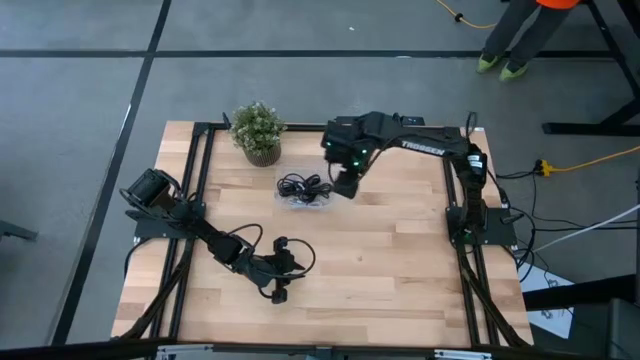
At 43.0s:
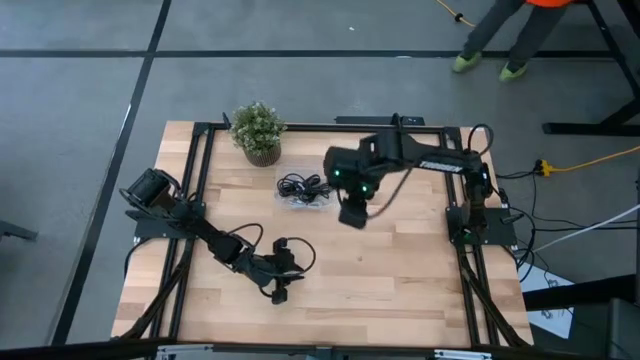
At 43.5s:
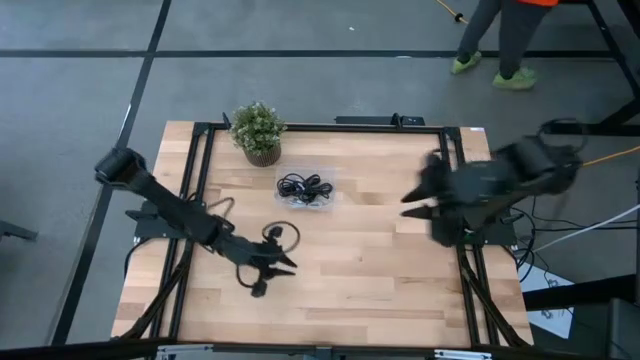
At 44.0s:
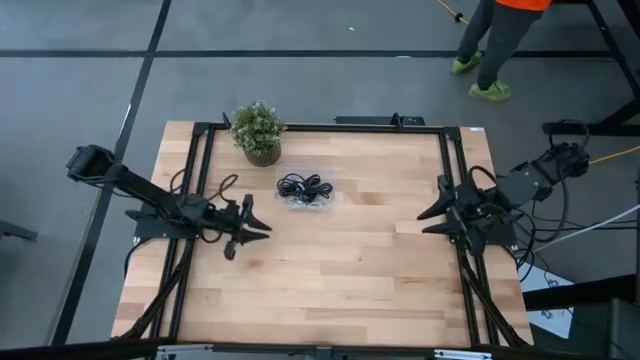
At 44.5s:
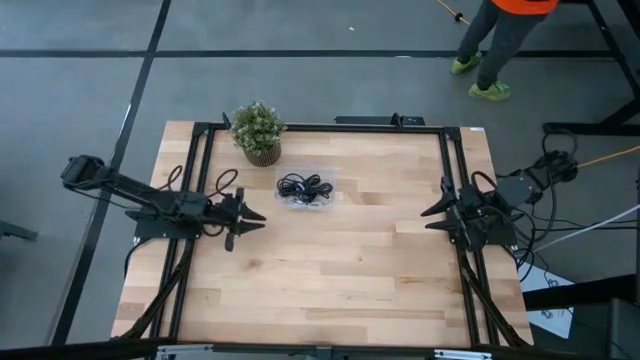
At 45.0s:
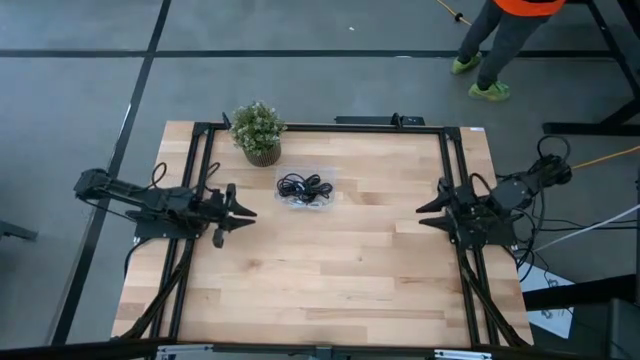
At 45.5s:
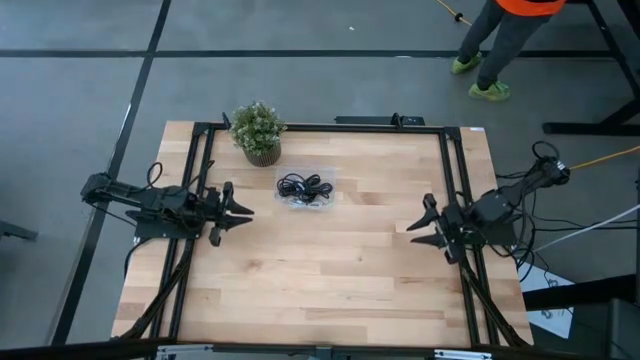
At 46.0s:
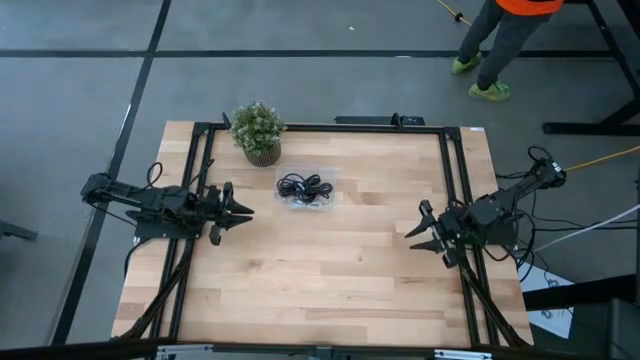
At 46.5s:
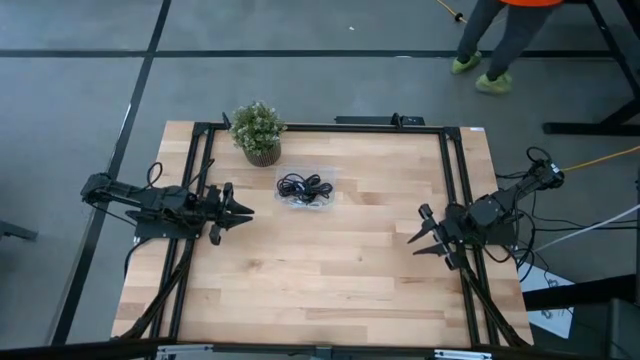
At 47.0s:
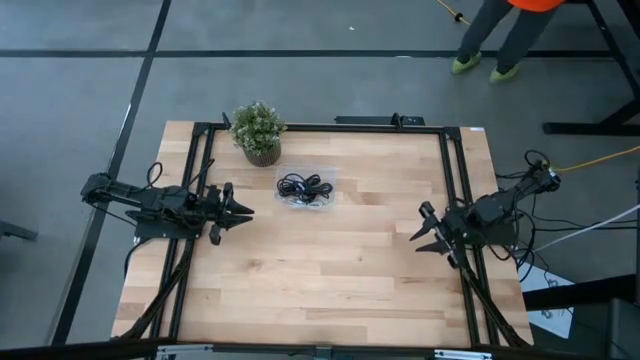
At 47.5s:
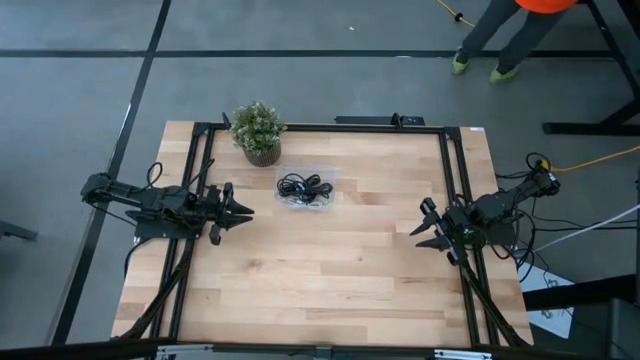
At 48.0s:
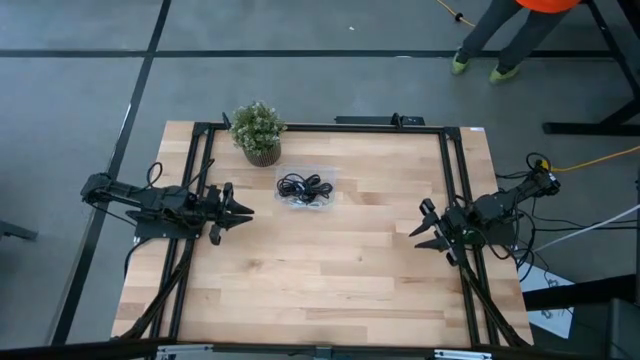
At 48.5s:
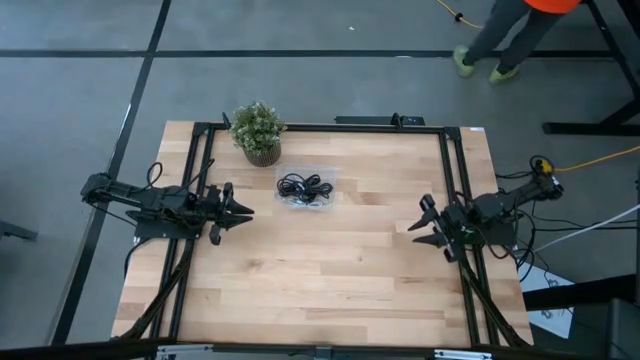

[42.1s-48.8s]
Task: Pick and place USB-C Cables
Return to home position

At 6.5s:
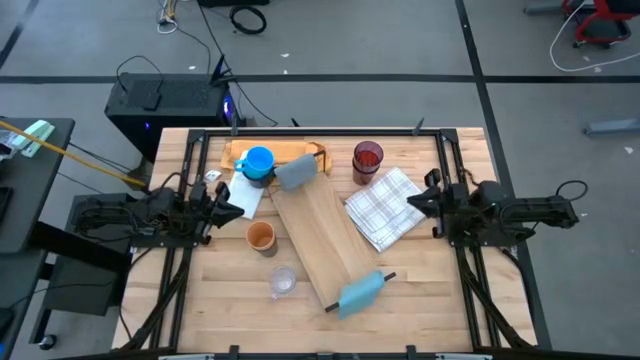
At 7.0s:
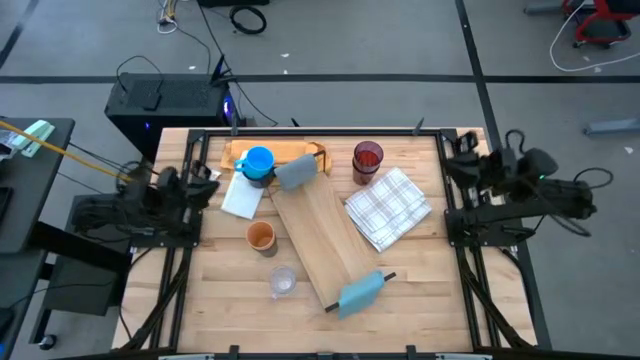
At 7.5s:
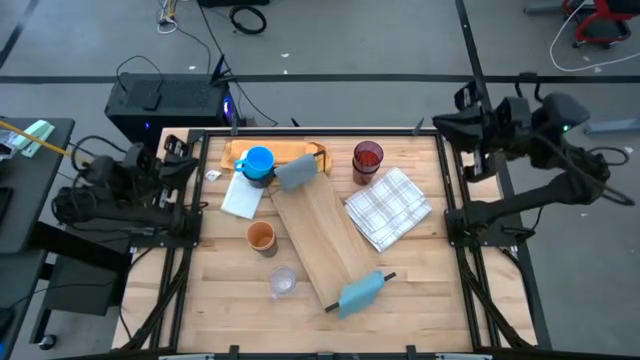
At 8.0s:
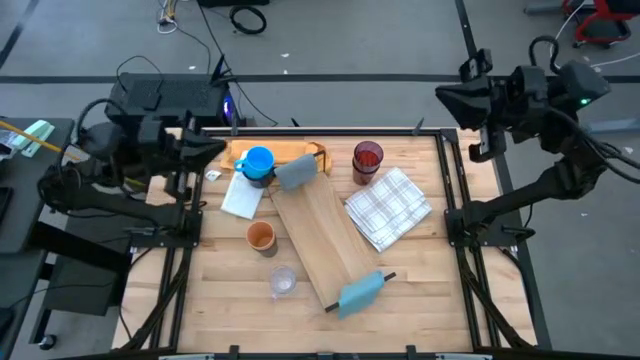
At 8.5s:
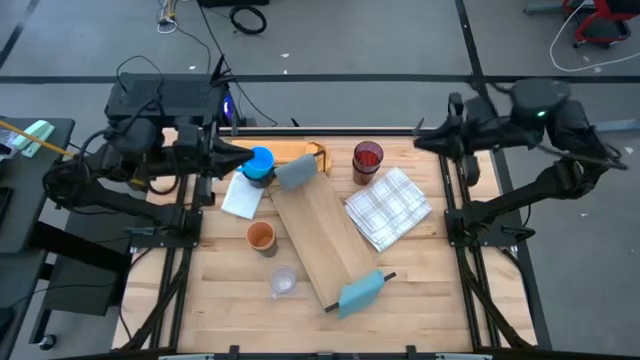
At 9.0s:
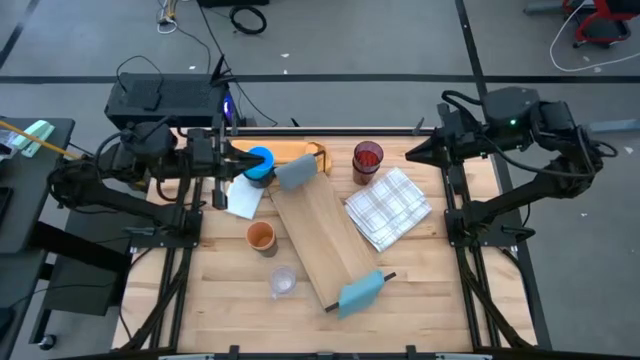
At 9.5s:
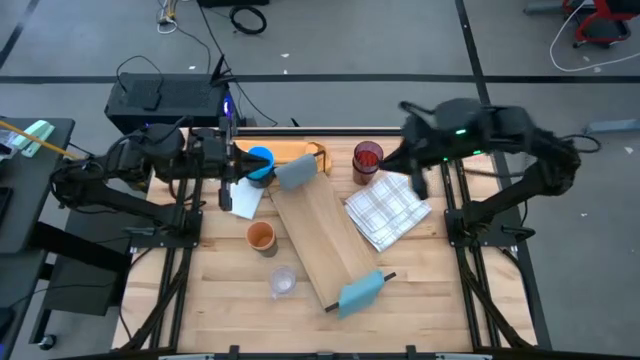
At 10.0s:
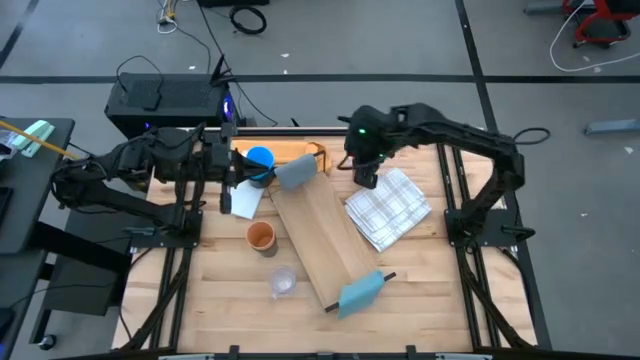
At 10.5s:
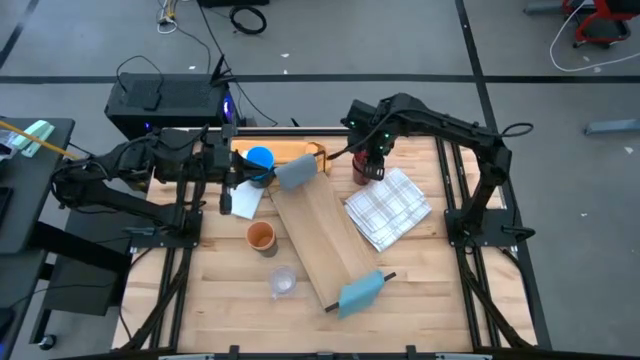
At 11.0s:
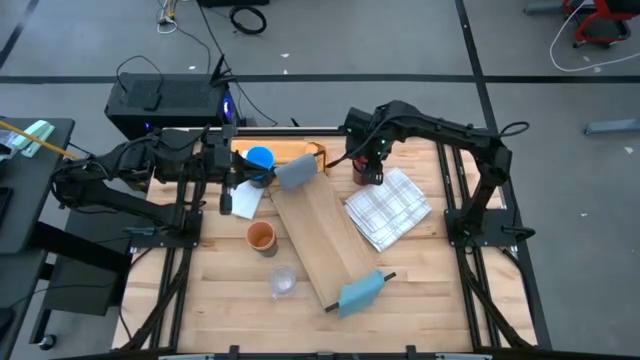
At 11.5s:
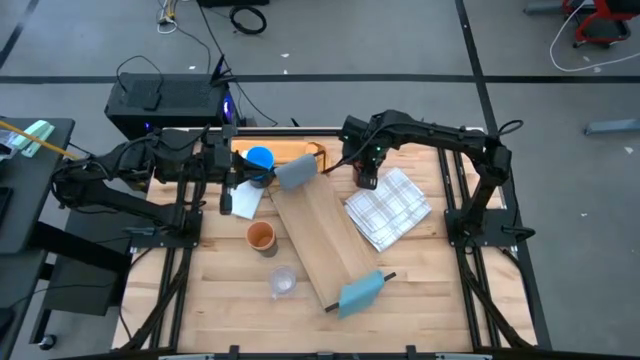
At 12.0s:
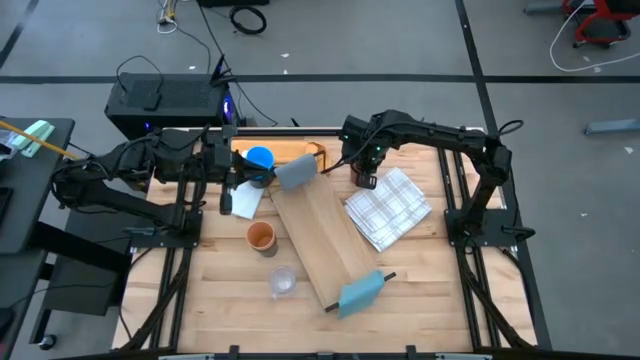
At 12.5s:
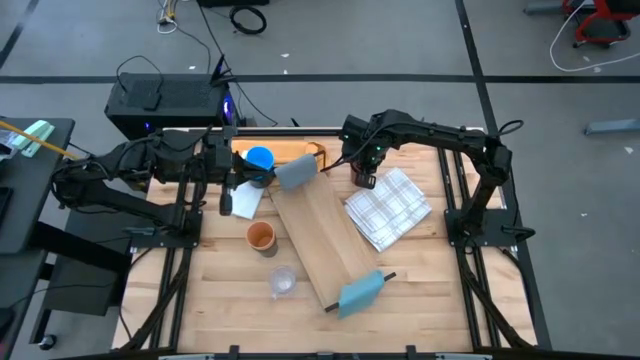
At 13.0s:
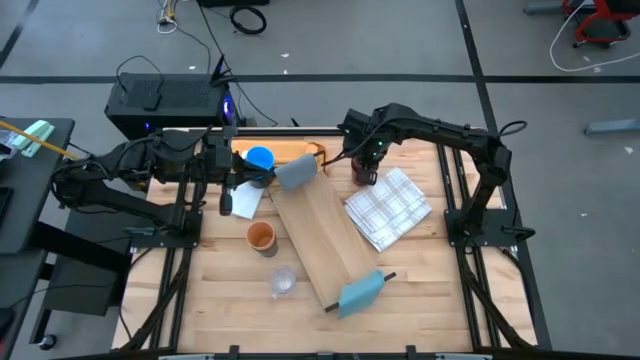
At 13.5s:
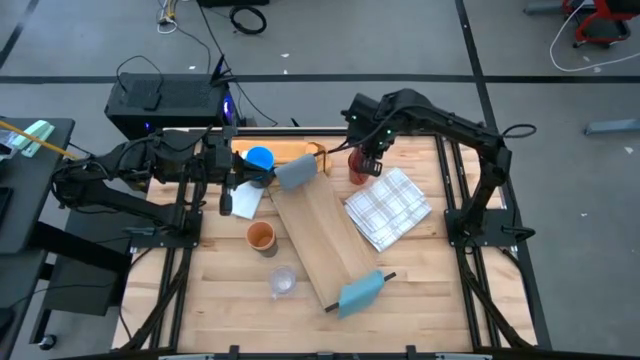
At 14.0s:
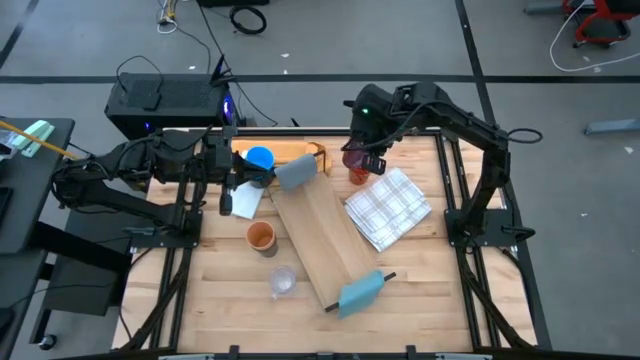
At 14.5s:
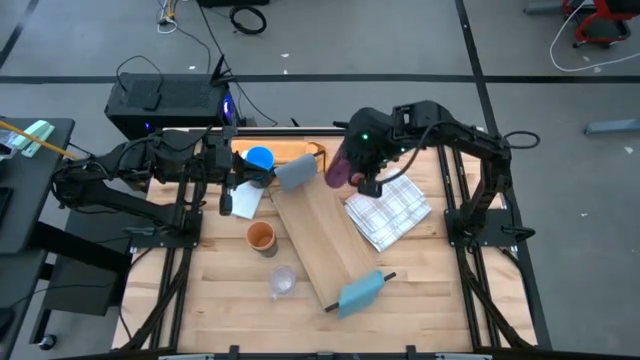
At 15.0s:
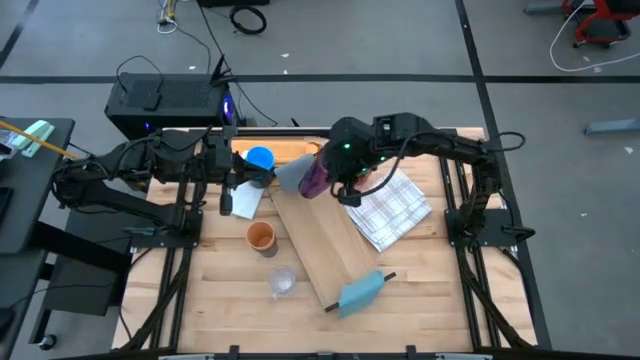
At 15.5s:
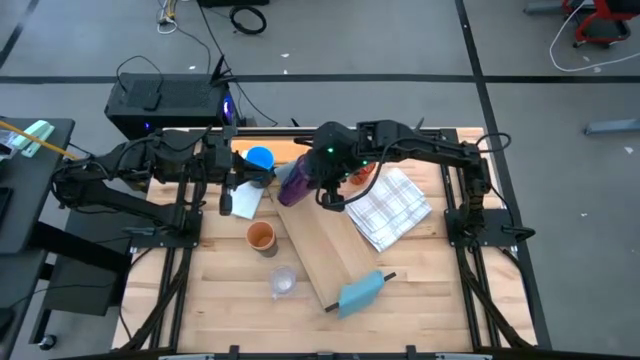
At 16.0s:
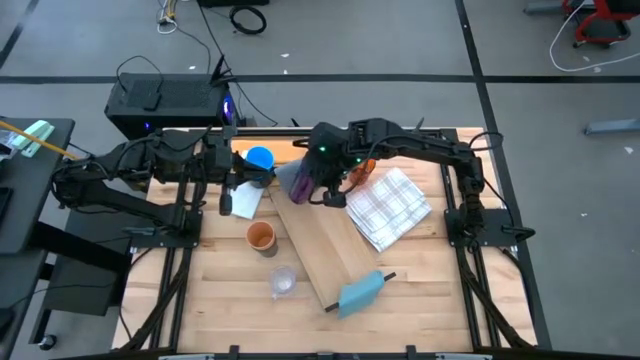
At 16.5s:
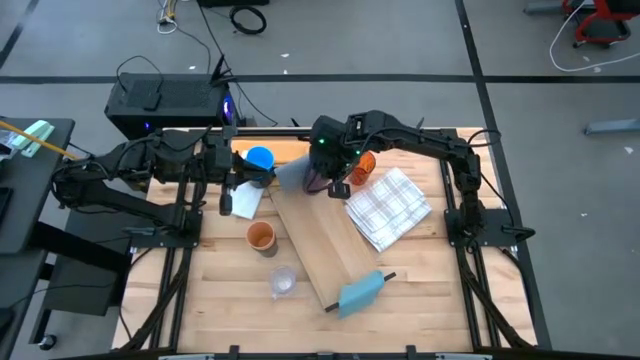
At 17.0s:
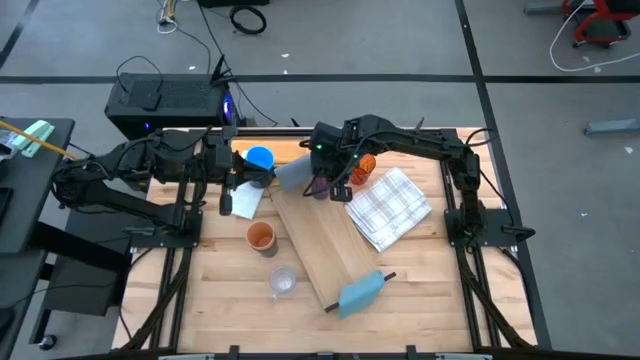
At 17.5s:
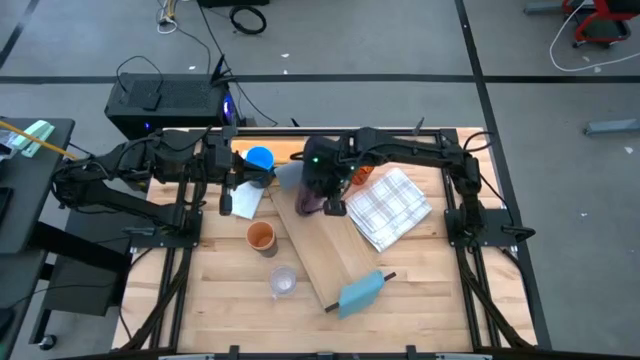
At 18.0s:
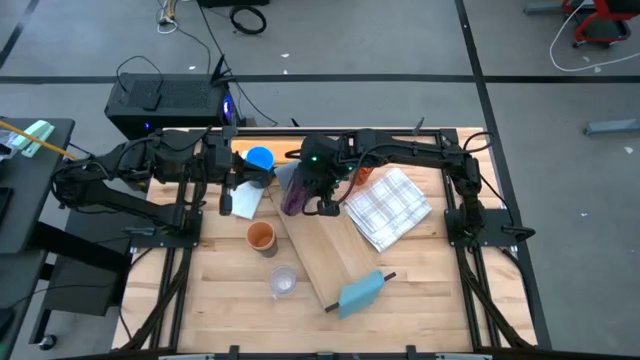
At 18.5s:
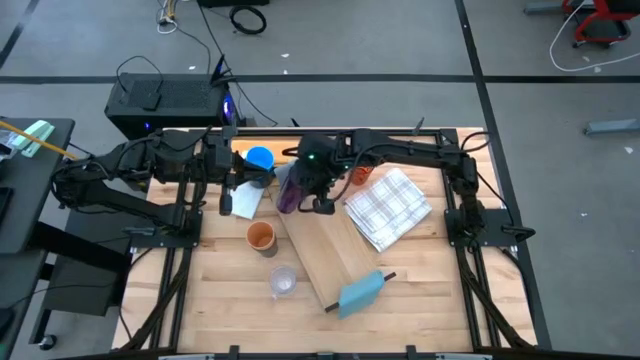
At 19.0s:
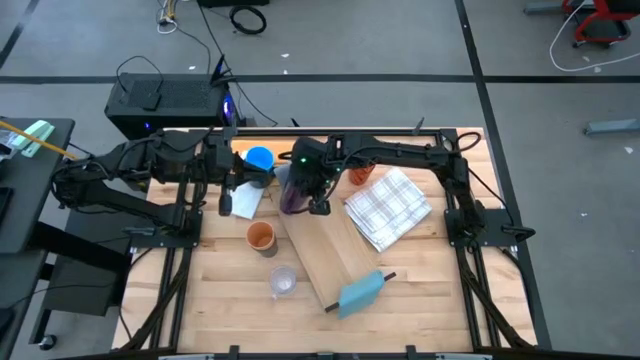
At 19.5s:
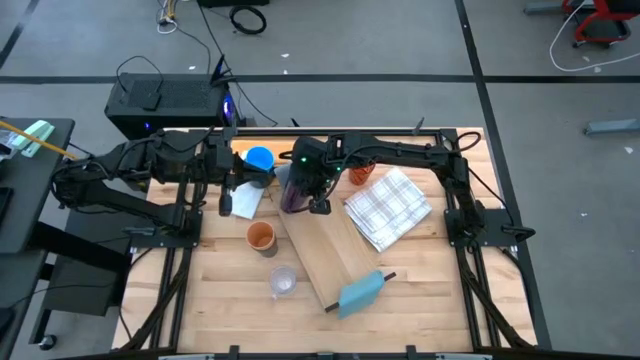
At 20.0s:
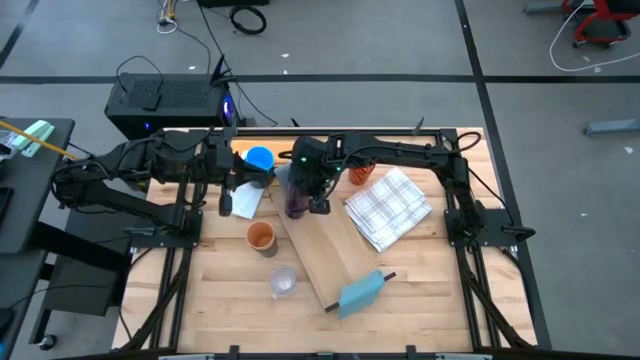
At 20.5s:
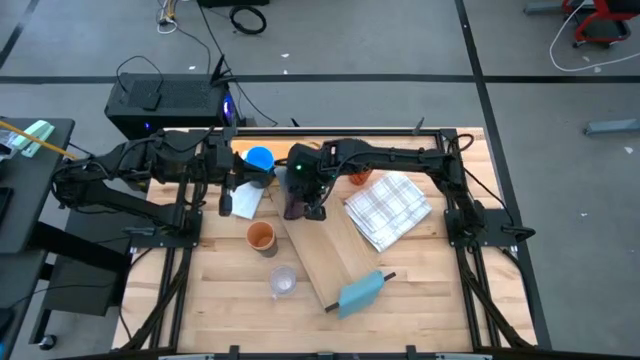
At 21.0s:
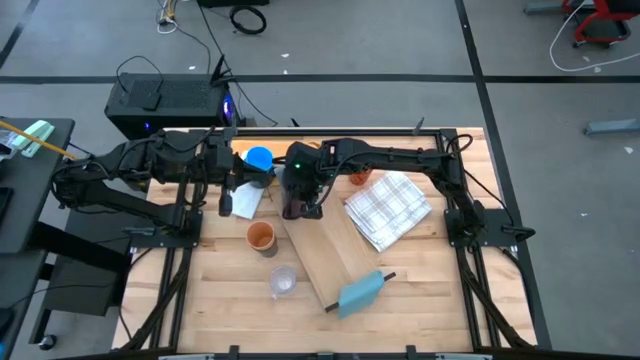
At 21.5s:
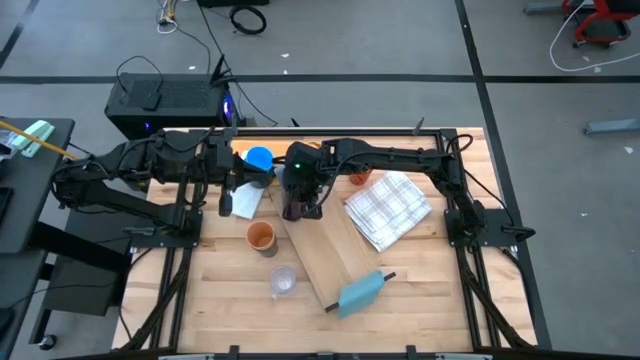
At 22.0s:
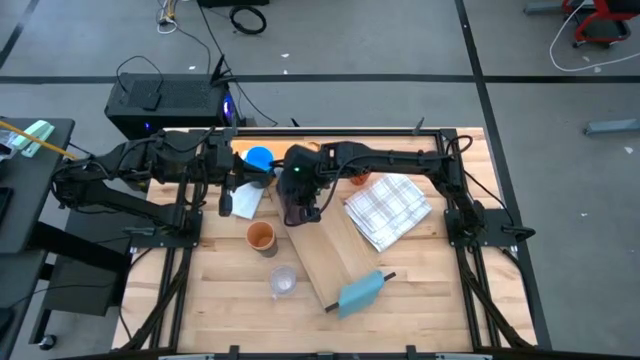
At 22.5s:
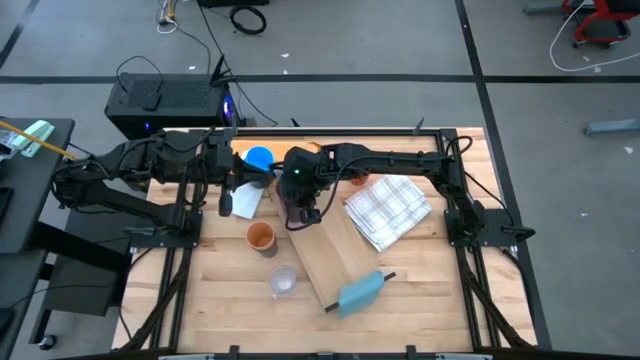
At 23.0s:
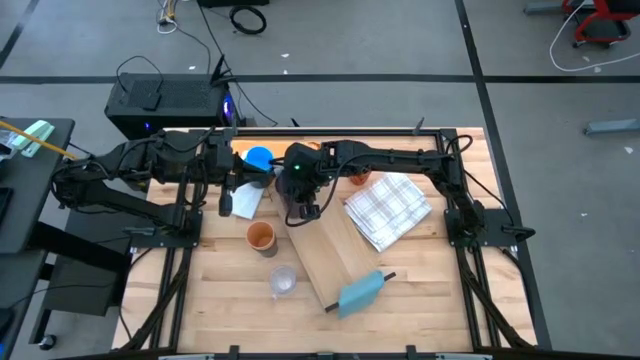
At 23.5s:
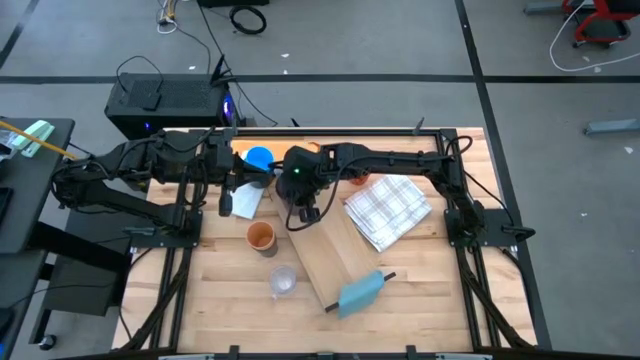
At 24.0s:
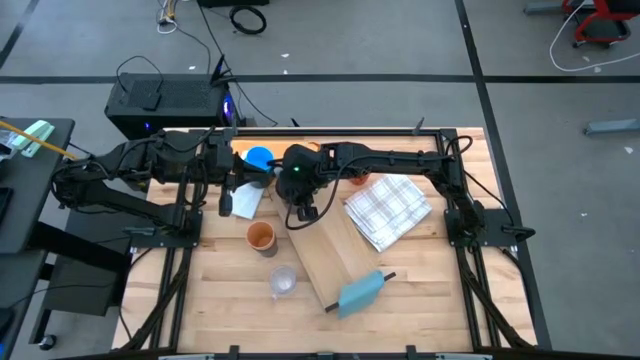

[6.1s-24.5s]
Task: Stack small to large cups/mugs on shelf
Put the purple cup on the shelf
